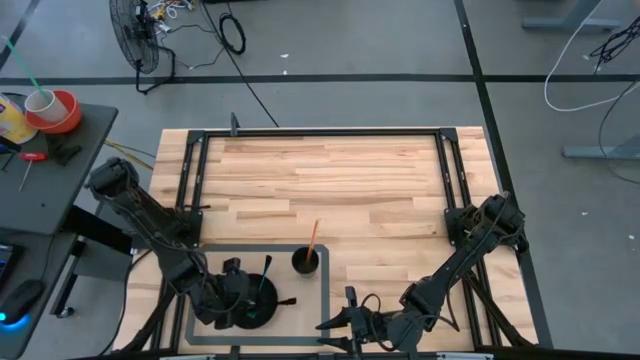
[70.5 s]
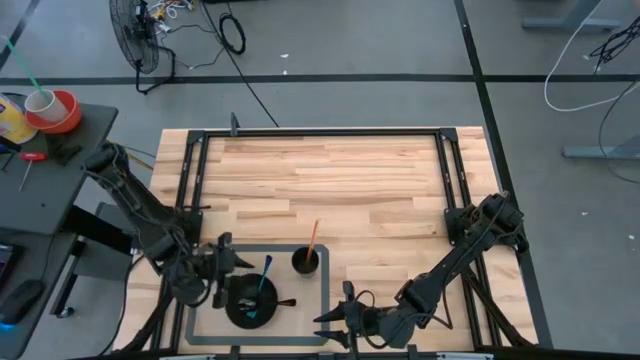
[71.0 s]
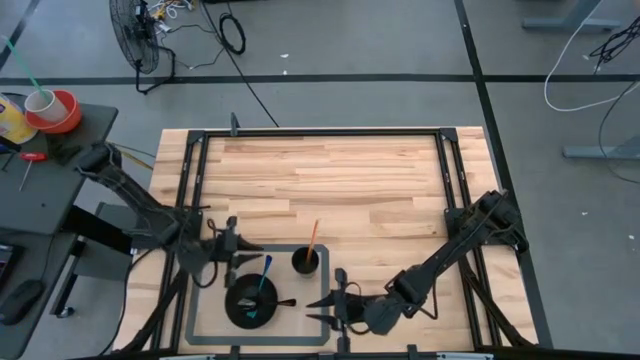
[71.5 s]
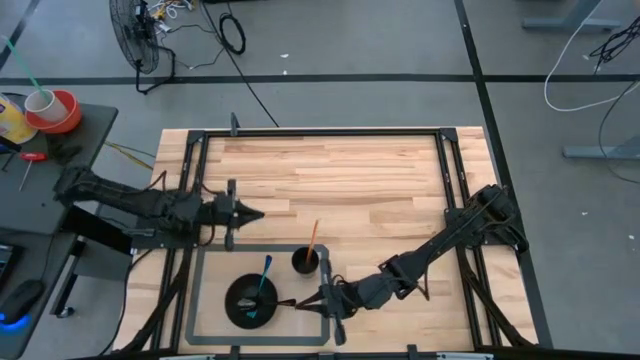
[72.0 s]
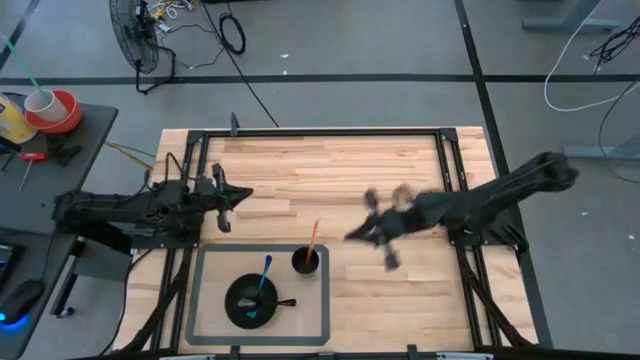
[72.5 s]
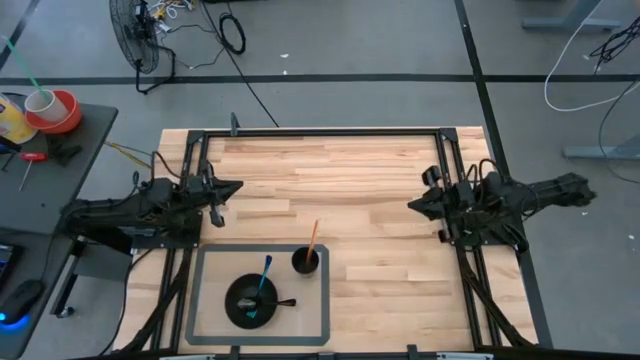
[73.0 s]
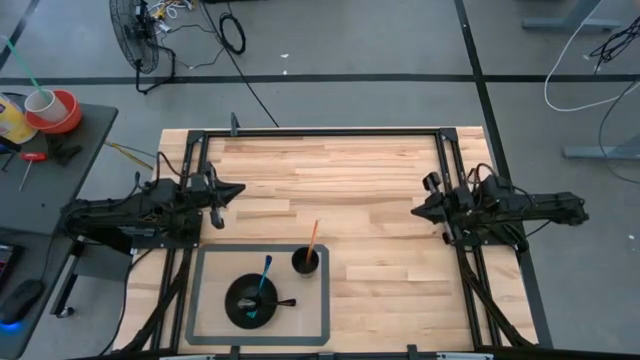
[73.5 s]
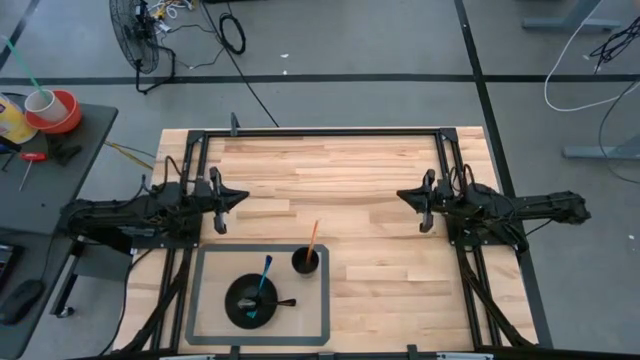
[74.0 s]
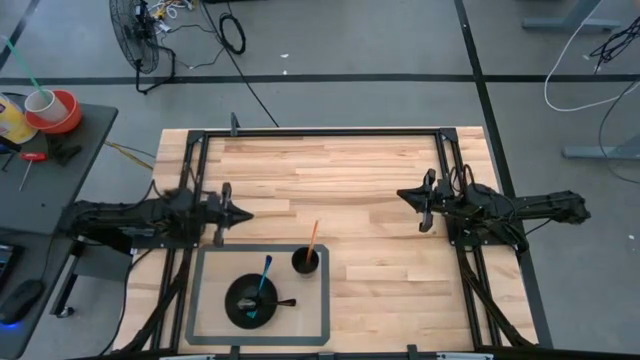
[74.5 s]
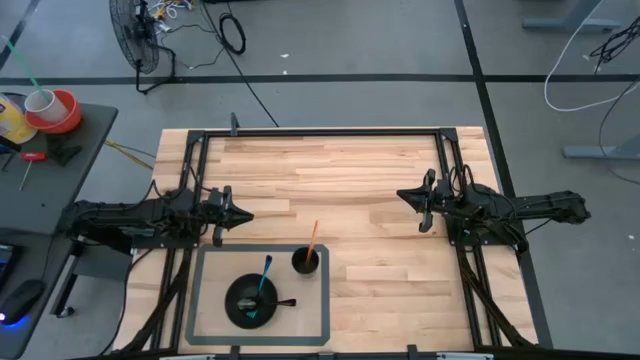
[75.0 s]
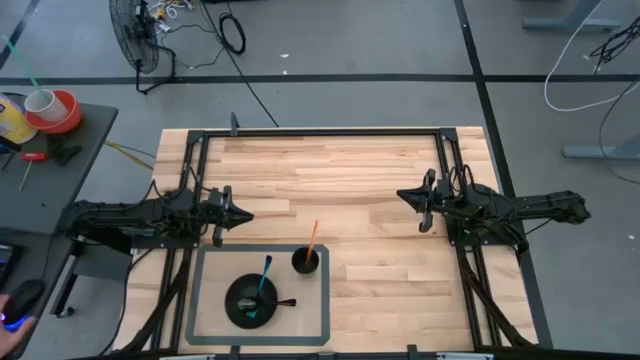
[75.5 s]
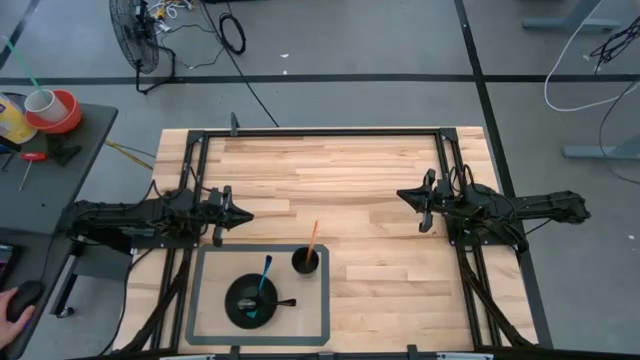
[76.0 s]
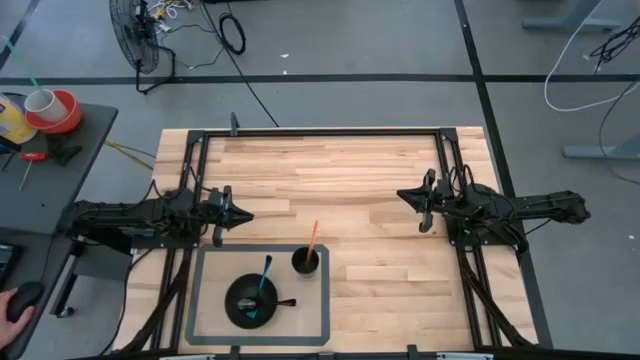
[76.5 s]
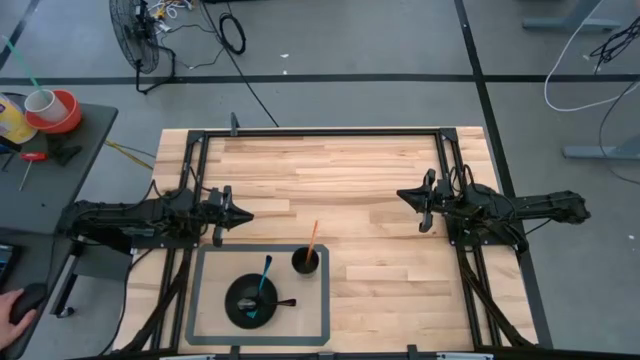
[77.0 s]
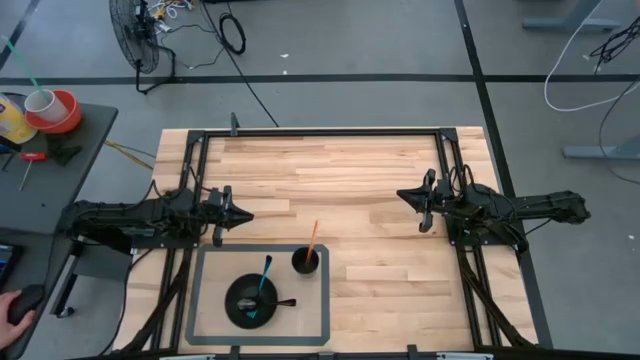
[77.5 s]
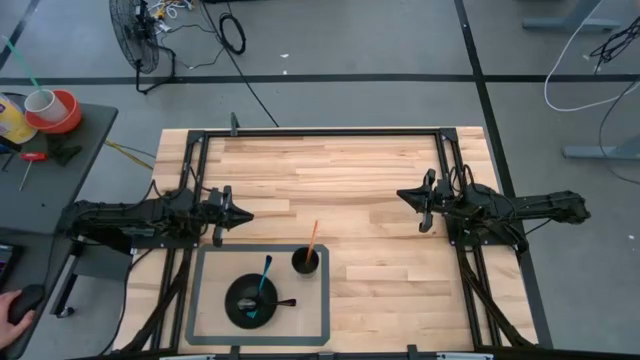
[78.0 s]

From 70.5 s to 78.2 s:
Task: Pick & Place Utensil
Return to Home Position

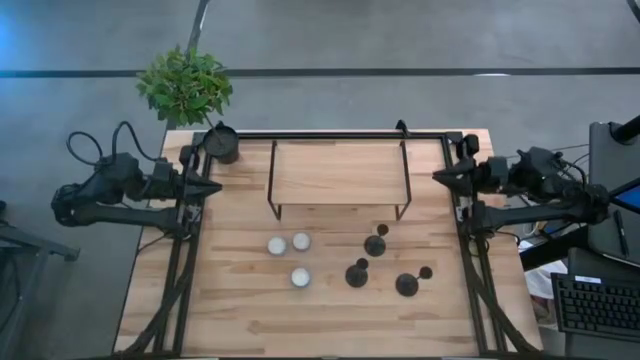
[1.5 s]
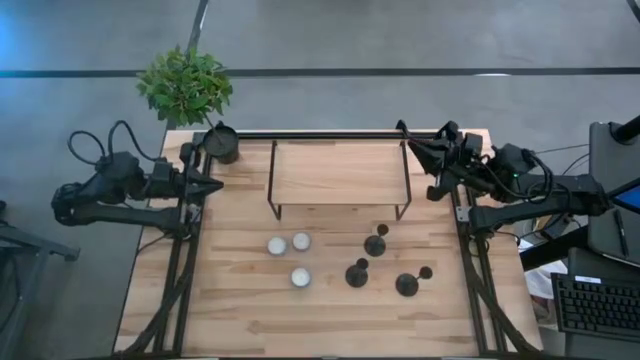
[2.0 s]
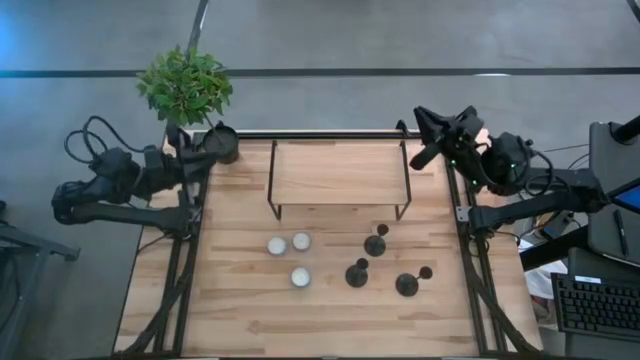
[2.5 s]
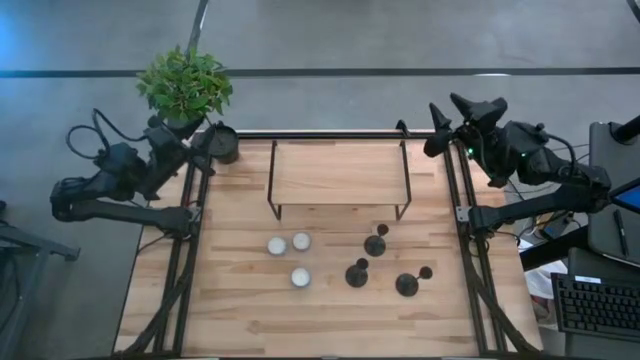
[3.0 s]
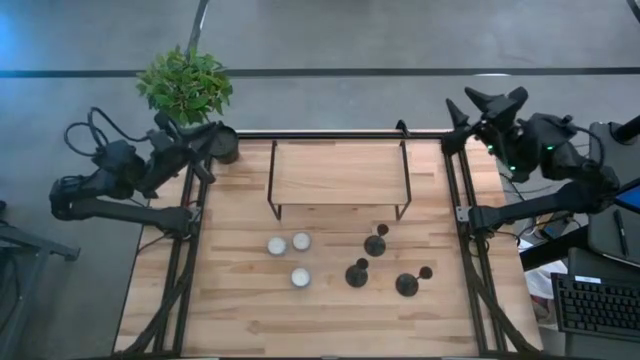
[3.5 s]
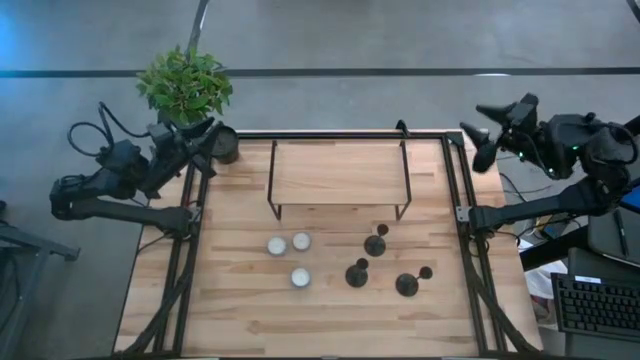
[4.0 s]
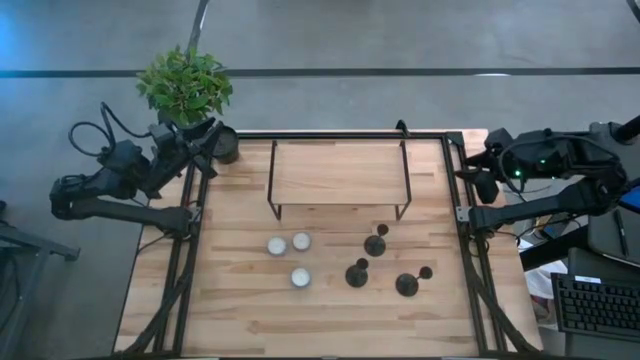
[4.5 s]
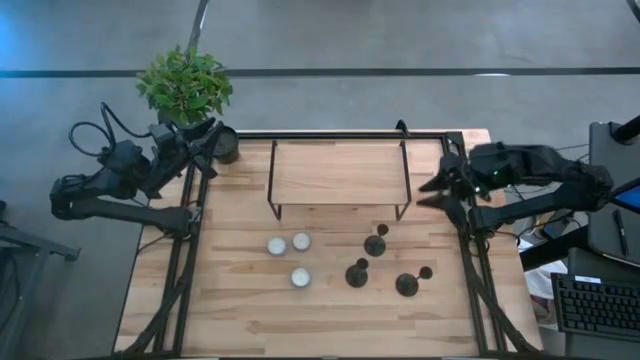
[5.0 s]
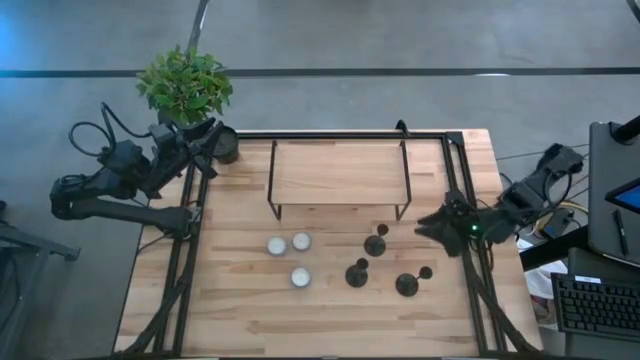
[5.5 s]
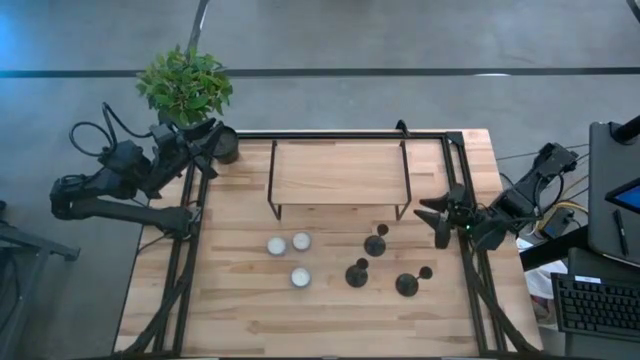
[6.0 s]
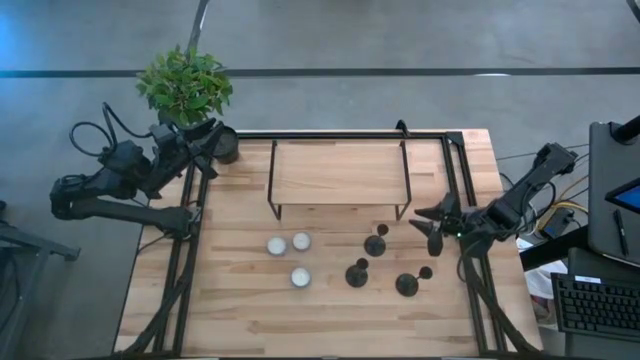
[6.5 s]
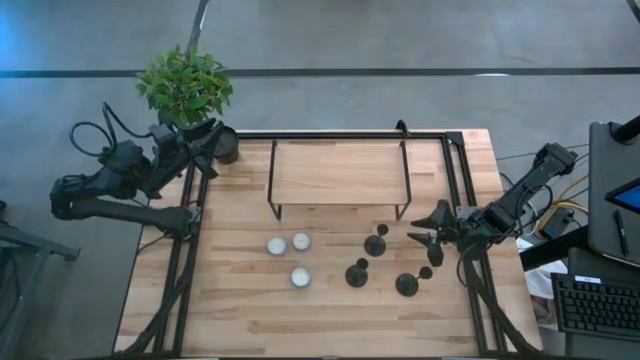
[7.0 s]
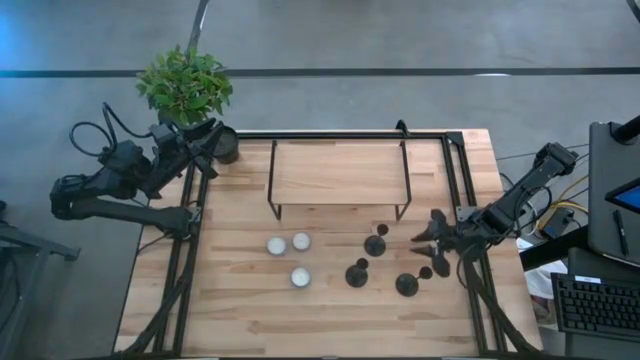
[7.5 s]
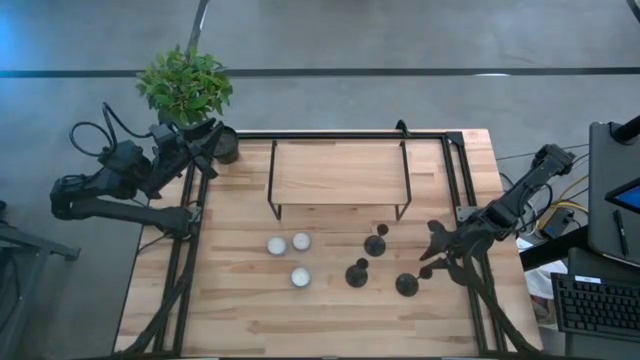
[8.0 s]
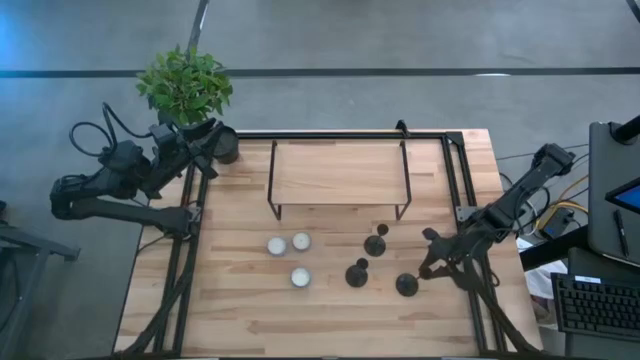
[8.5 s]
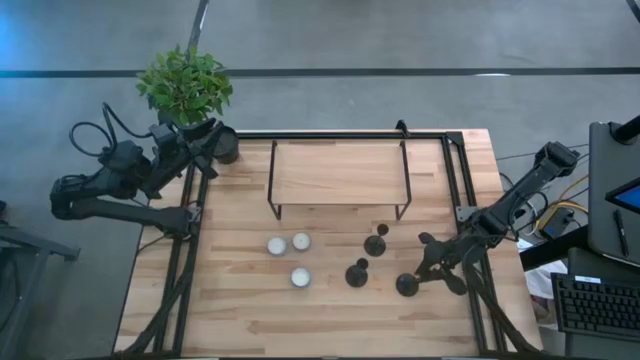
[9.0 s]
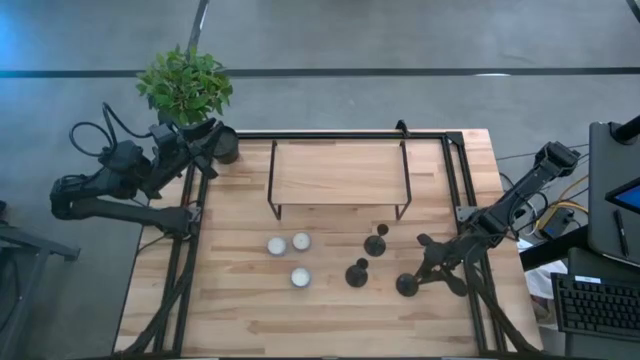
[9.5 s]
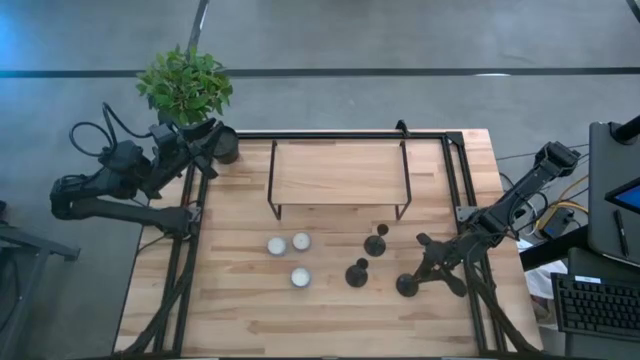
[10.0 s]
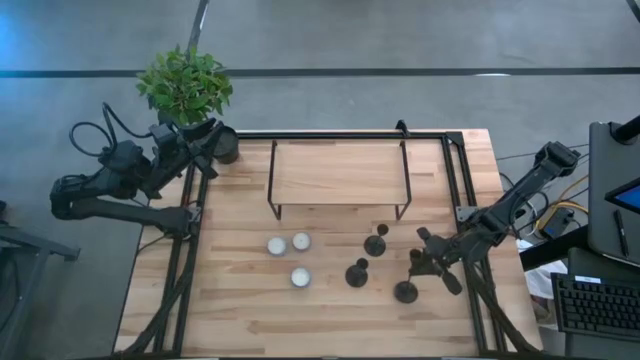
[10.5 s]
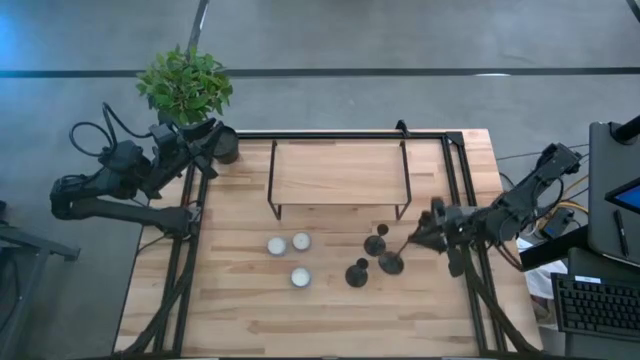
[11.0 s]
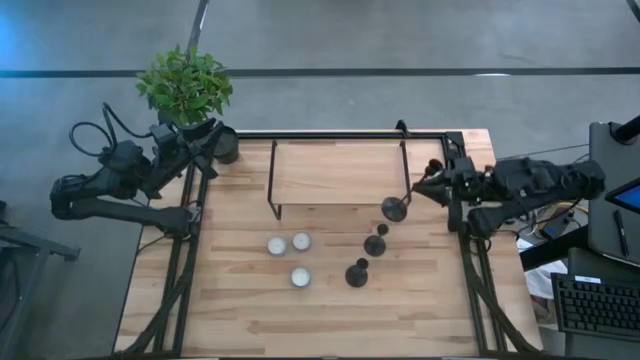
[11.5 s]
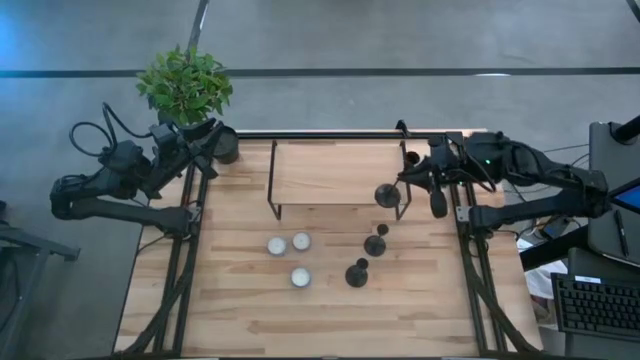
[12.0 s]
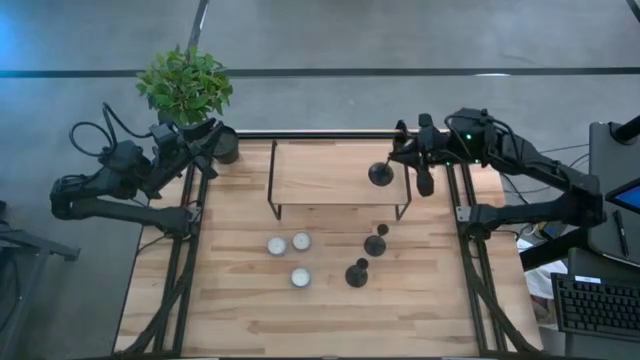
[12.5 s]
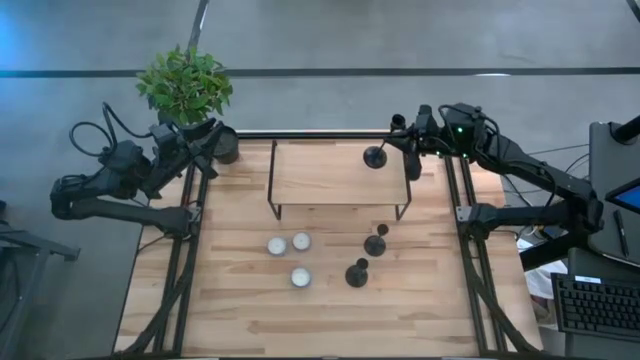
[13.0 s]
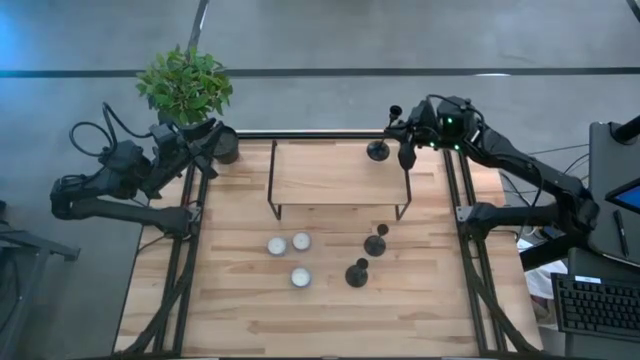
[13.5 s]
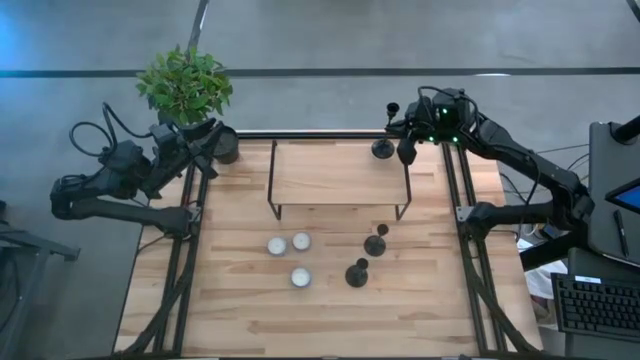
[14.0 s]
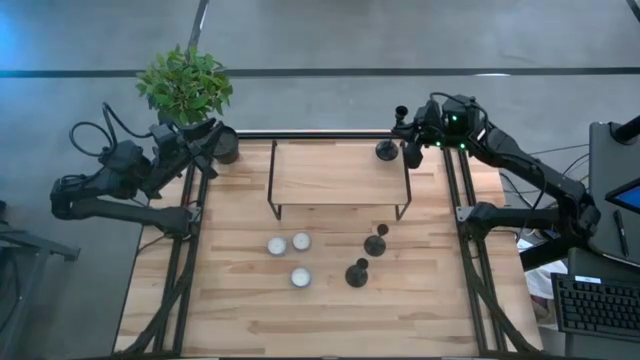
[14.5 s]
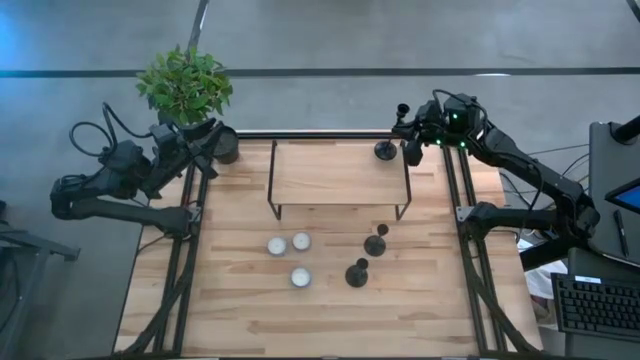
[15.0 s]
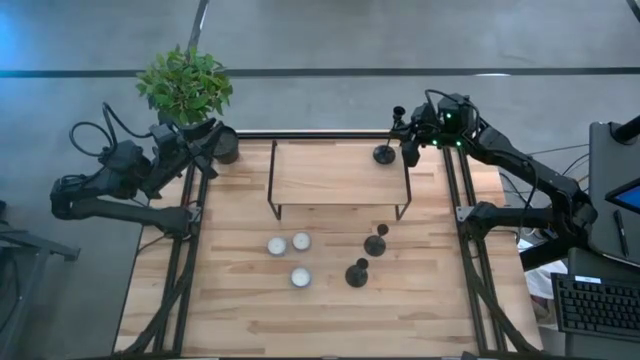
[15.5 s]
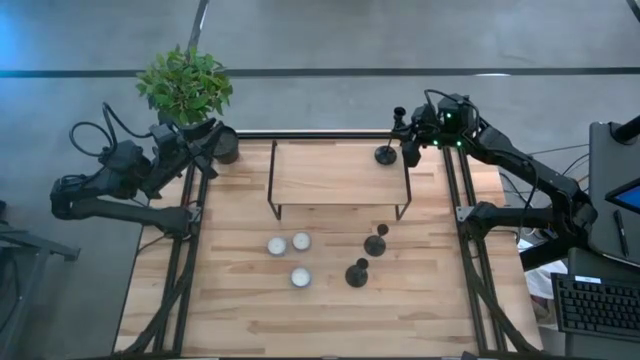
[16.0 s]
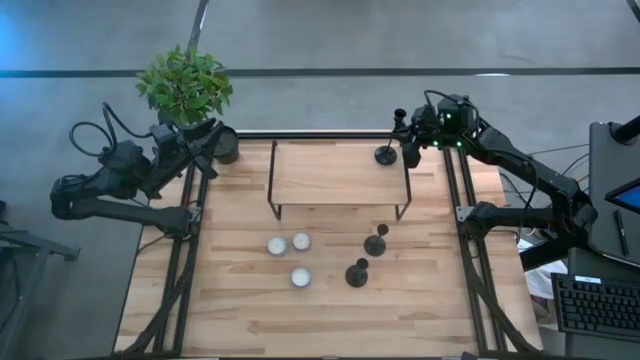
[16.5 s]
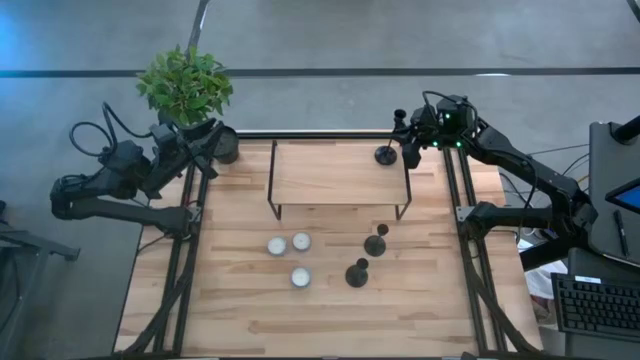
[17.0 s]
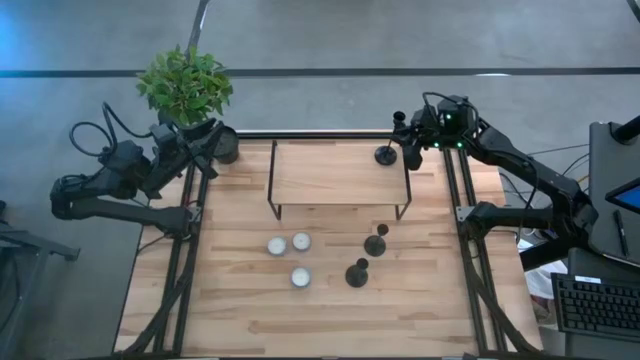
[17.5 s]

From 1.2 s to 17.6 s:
Task: Pick & Place candle stick holders
Put the bottom right black candle holder on the shelf
